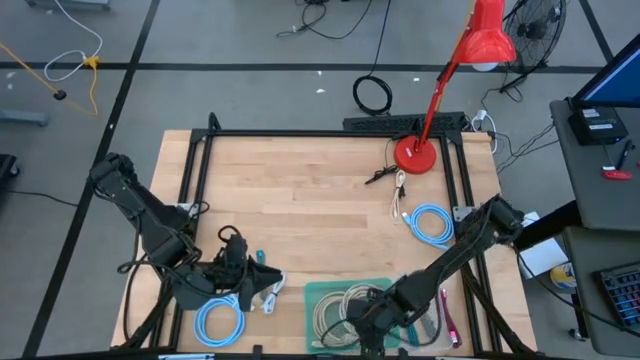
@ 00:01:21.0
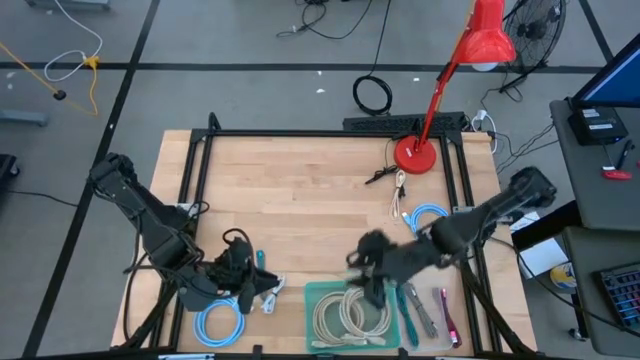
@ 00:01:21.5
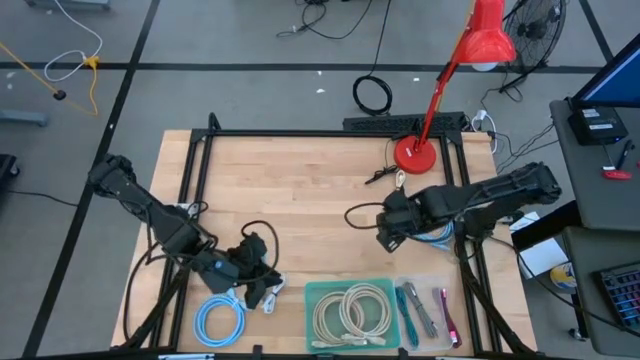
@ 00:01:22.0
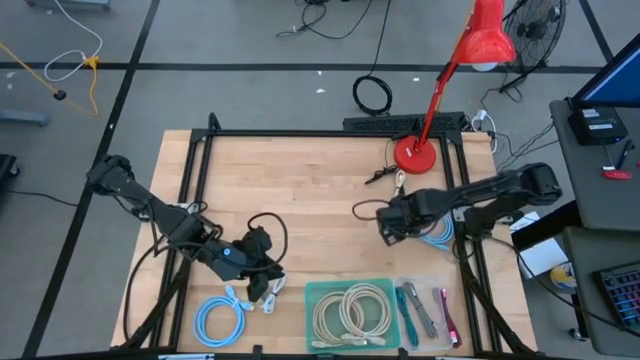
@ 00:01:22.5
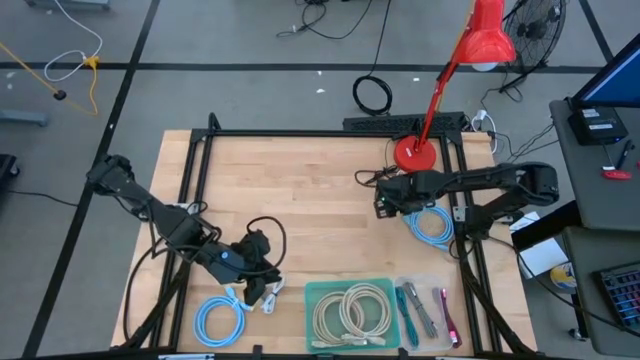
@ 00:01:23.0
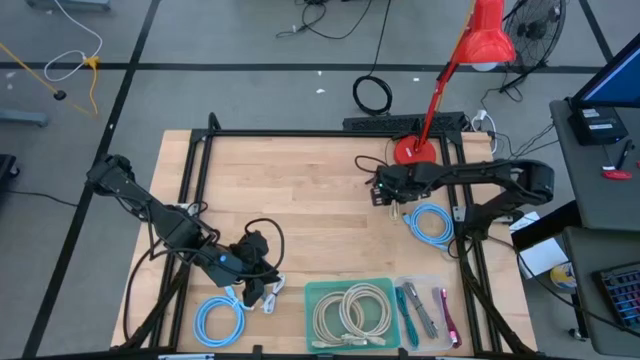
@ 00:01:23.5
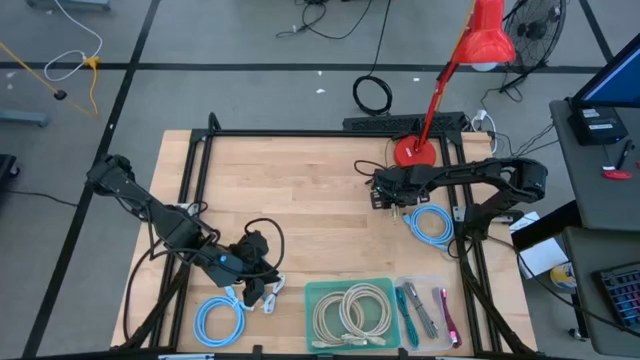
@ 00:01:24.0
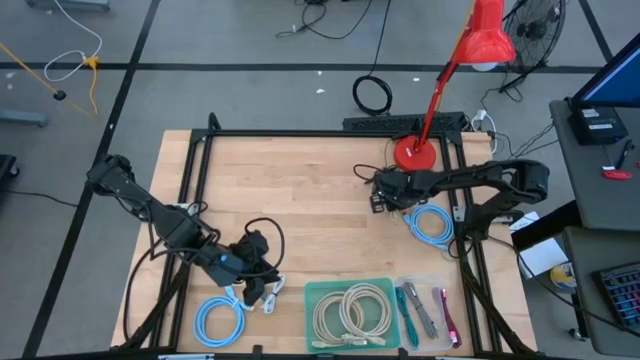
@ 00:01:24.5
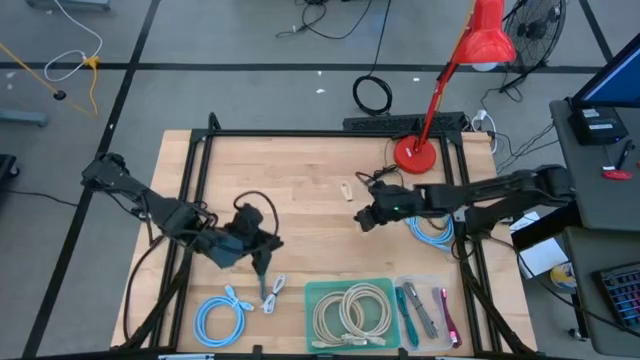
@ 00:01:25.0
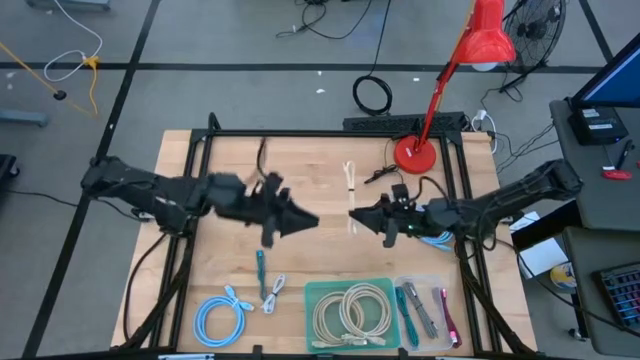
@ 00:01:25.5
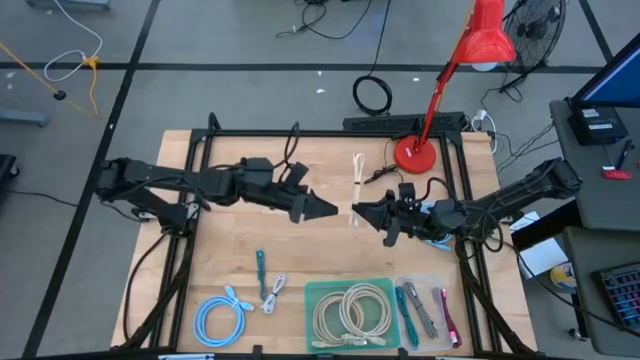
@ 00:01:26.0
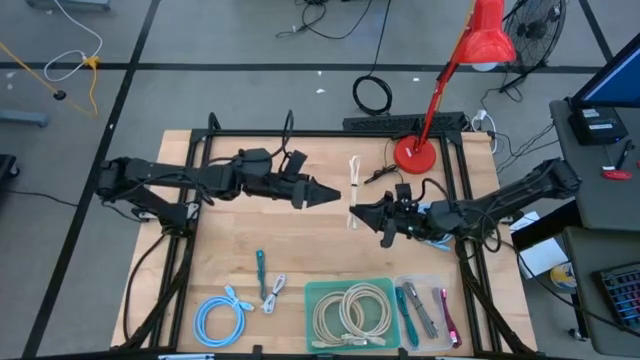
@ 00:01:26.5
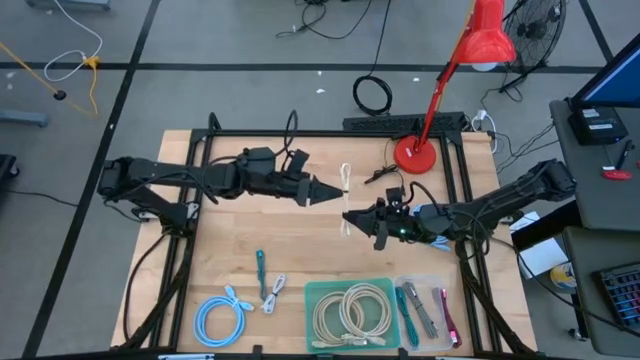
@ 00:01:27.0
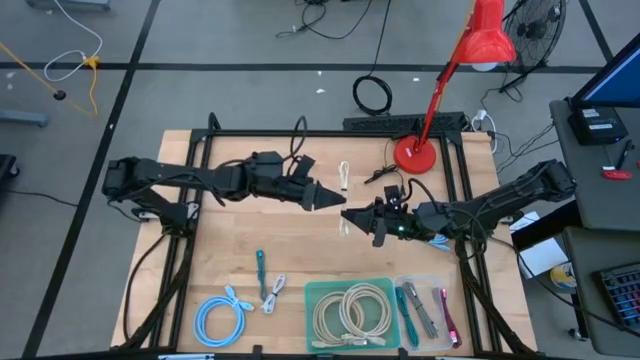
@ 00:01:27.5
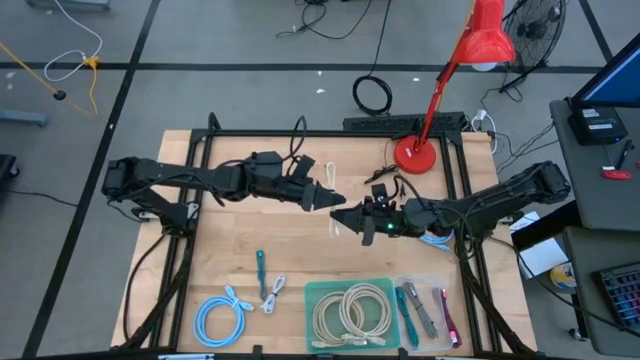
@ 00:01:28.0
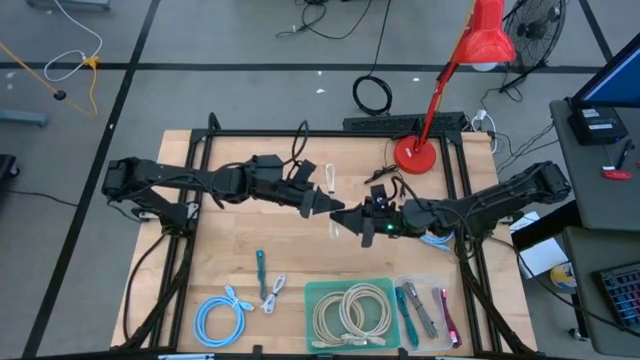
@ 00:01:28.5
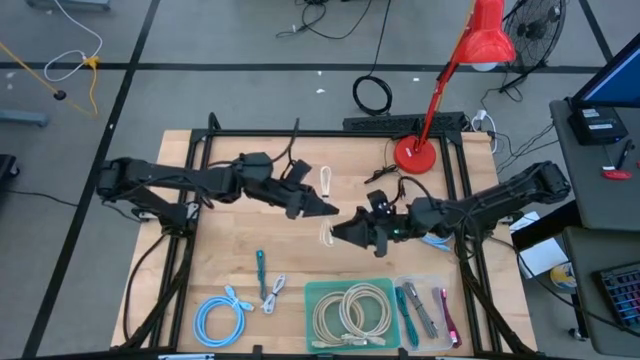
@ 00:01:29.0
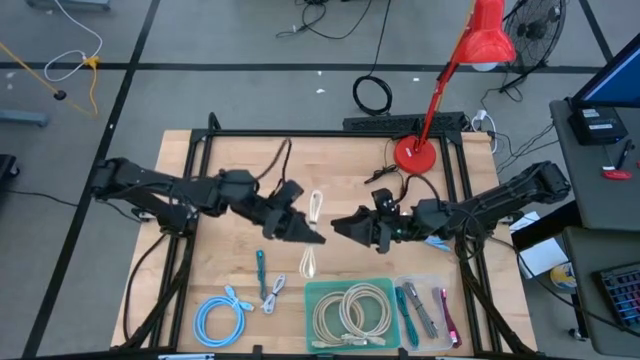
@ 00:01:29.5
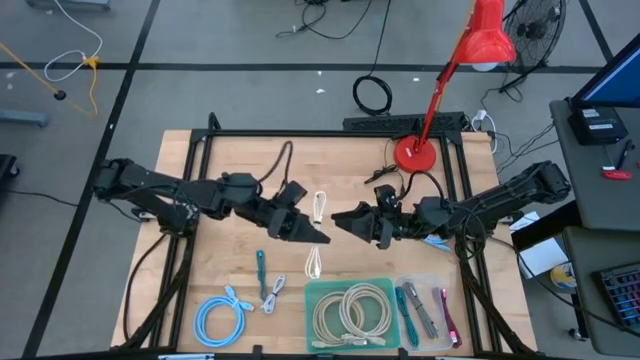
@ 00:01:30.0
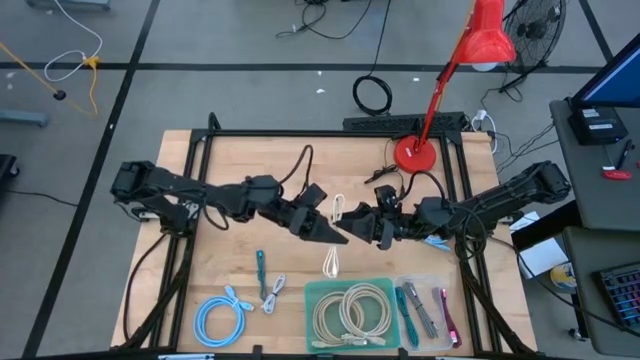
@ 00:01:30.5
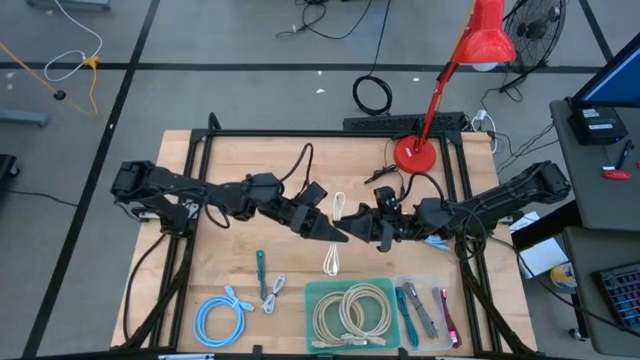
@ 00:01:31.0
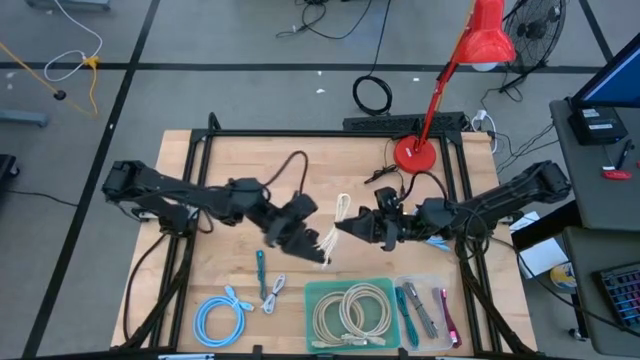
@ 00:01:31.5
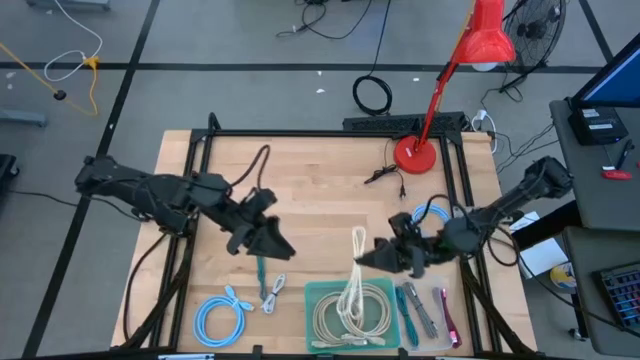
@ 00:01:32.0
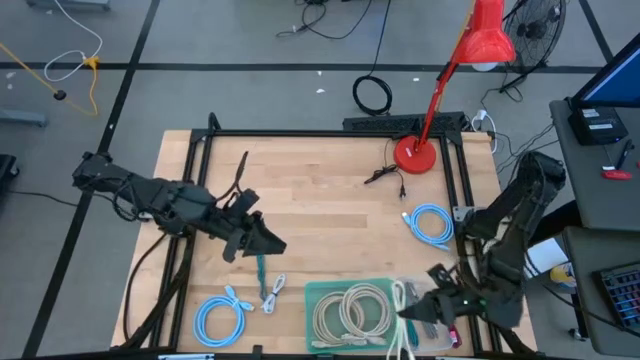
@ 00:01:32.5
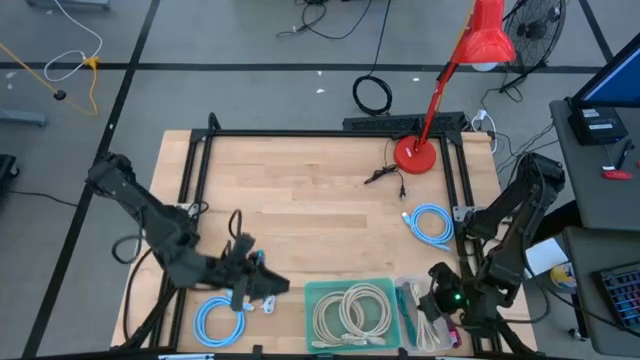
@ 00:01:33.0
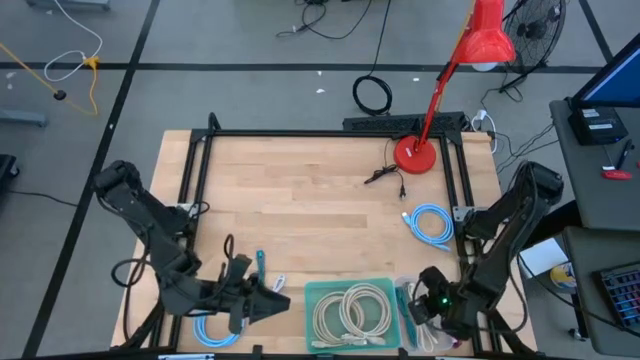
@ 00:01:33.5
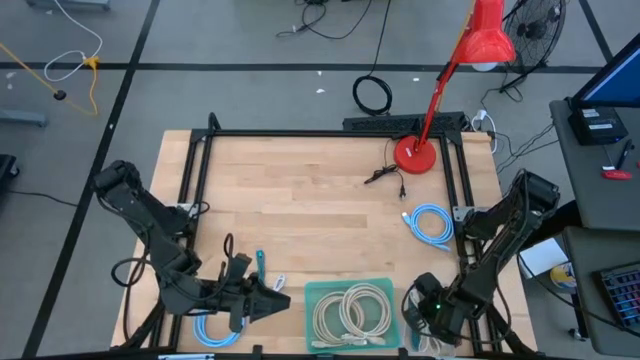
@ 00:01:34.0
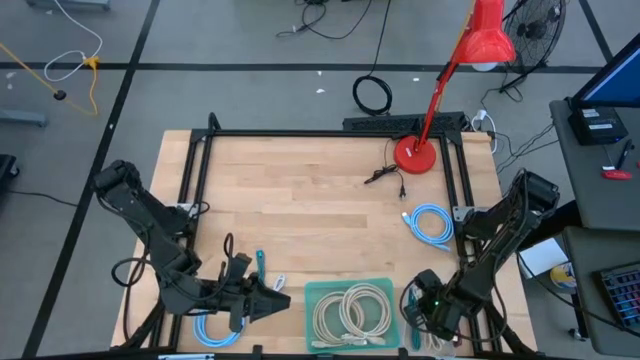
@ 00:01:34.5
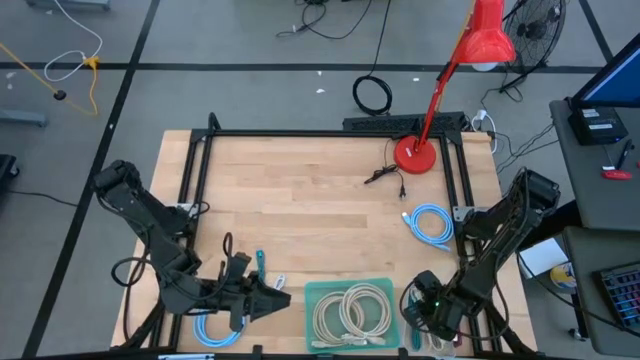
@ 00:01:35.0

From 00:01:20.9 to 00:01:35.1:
Task: Pick & Place USB Port
Put the brown charger cable into the white transparent bin

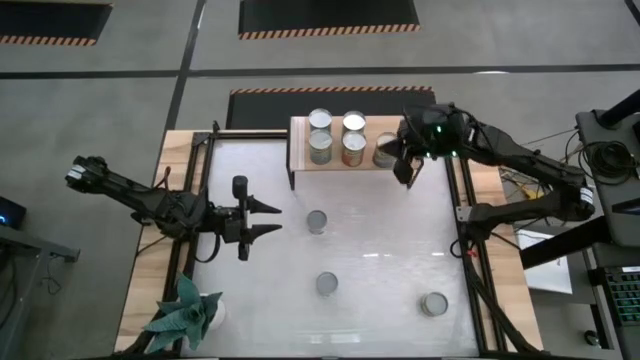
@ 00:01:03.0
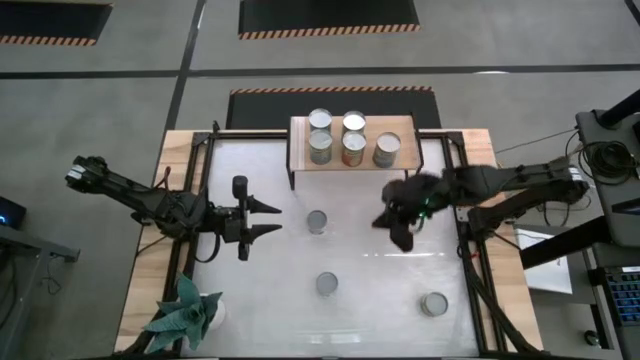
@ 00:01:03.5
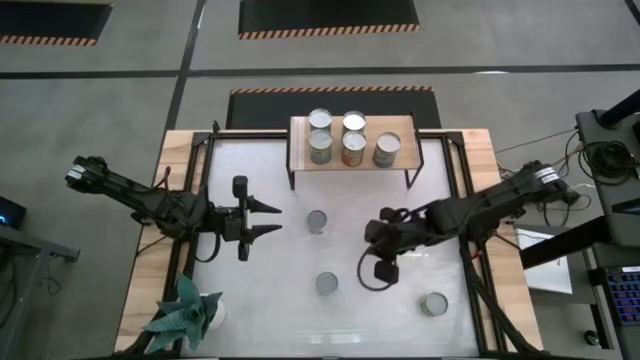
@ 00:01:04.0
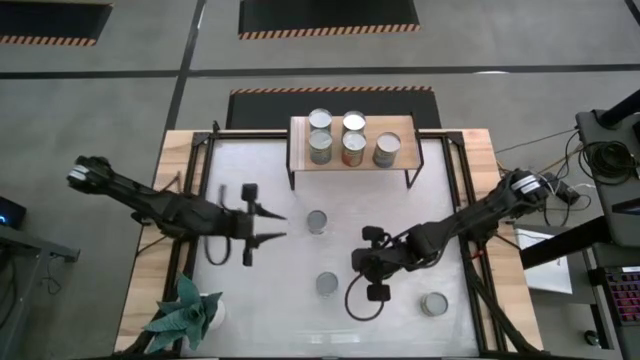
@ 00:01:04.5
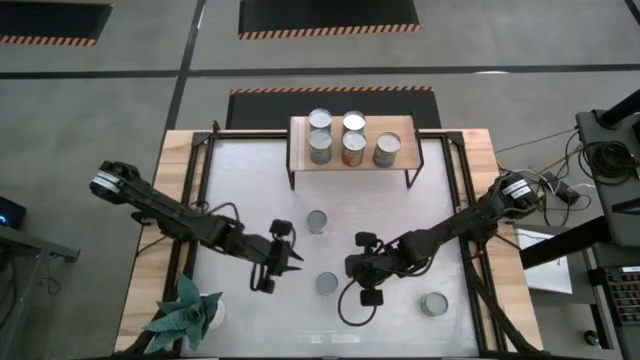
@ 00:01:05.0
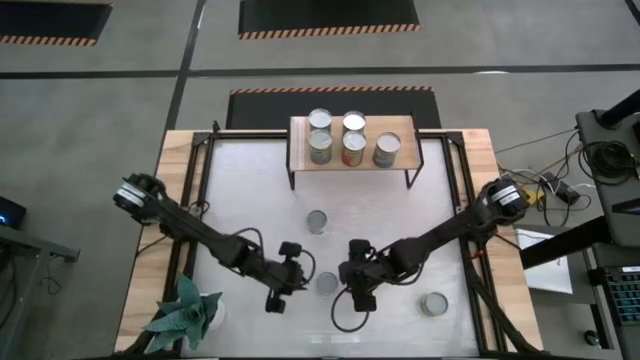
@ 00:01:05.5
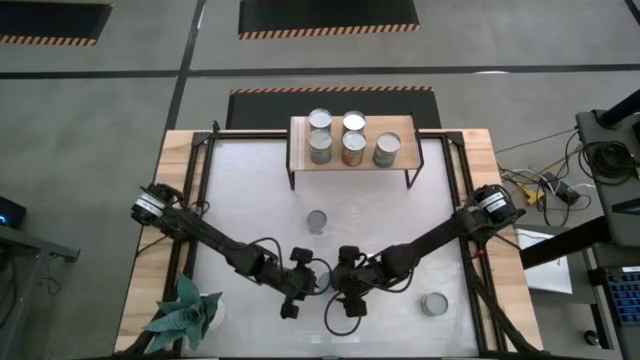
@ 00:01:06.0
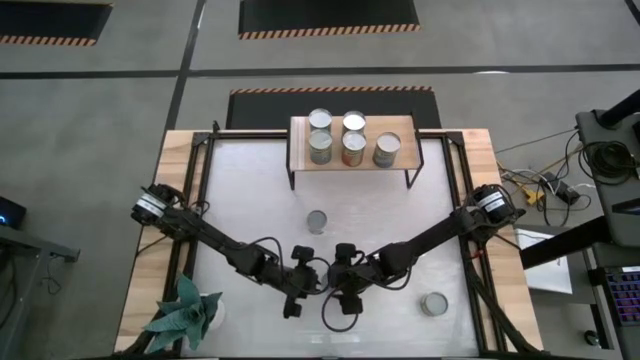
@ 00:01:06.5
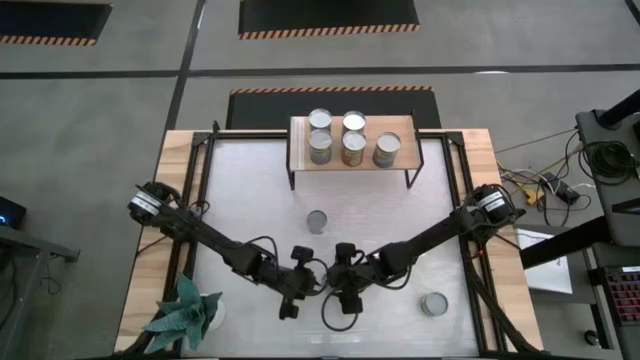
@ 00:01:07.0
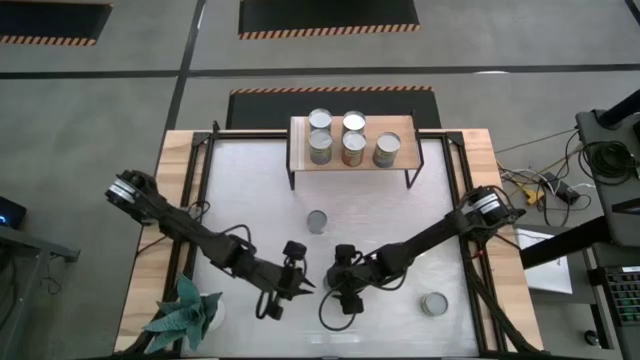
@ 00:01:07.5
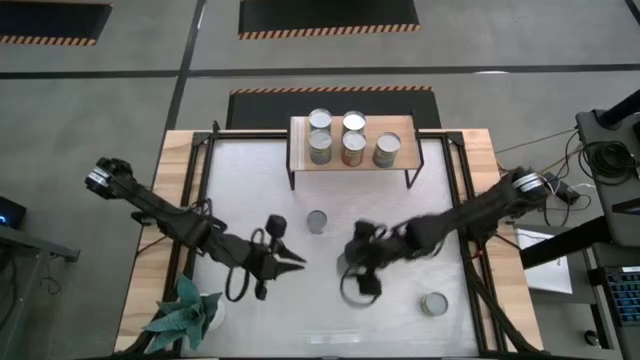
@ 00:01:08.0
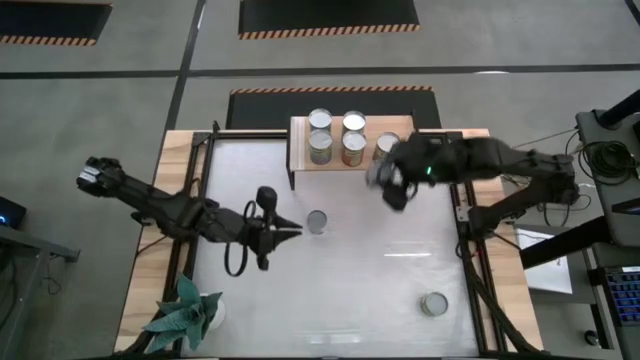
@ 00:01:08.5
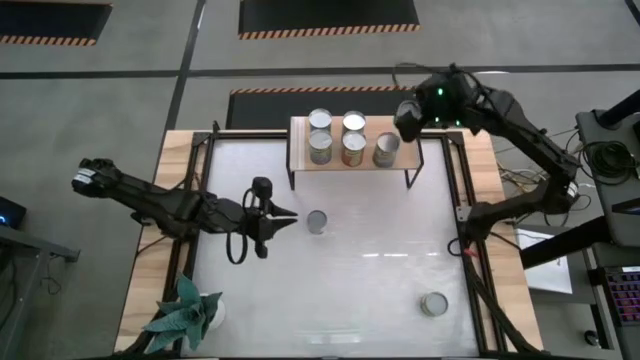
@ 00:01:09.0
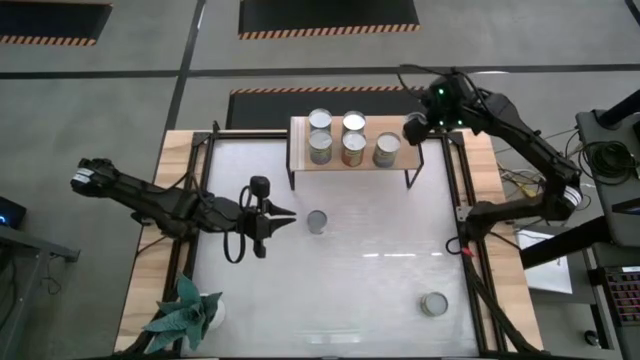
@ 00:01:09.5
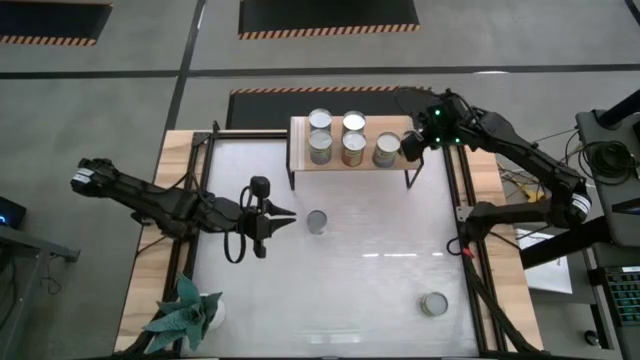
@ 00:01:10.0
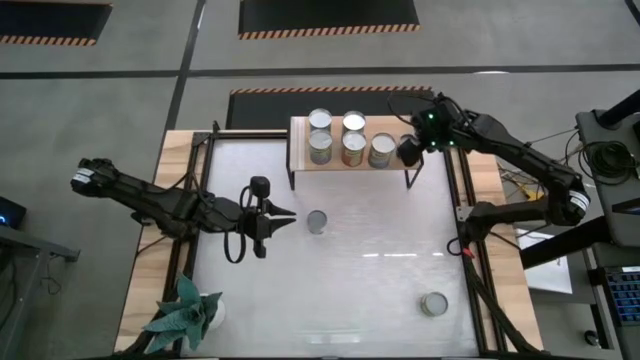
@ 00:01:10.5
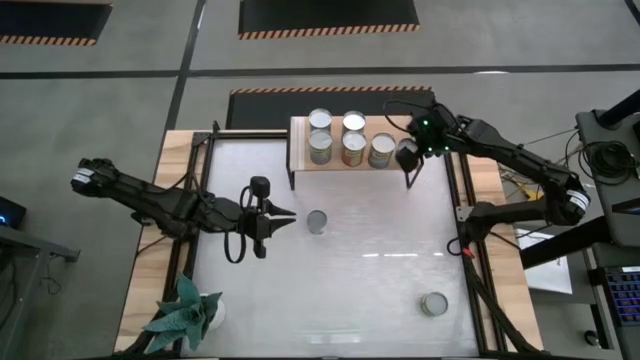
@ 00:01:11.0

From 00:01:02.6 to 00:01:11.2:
Task: Pick and place cans onto a shelf
Put the small canned peas on the shelf
